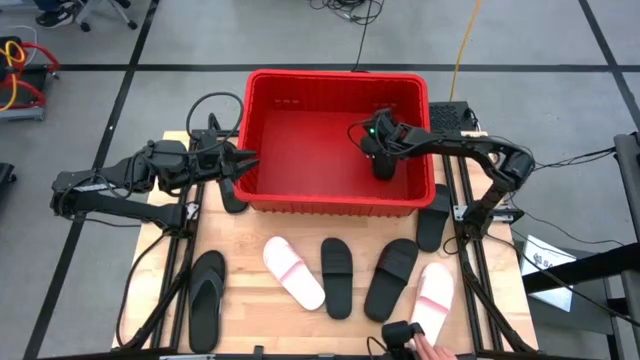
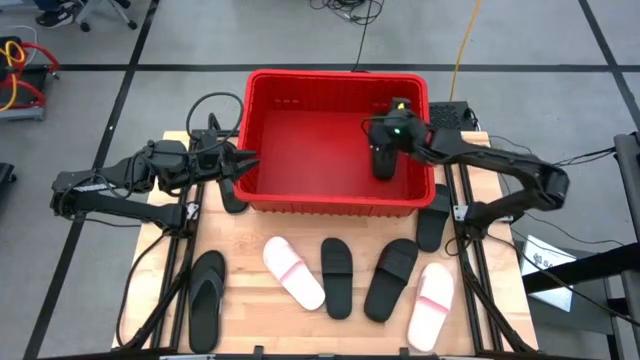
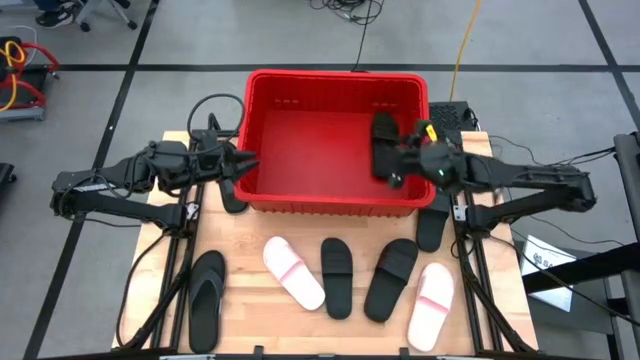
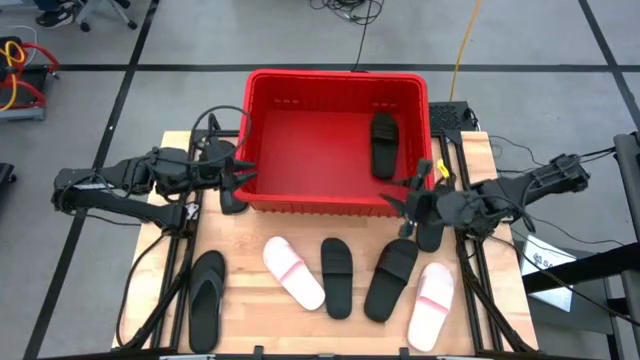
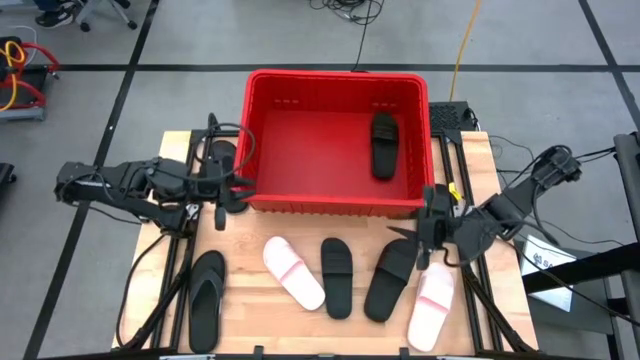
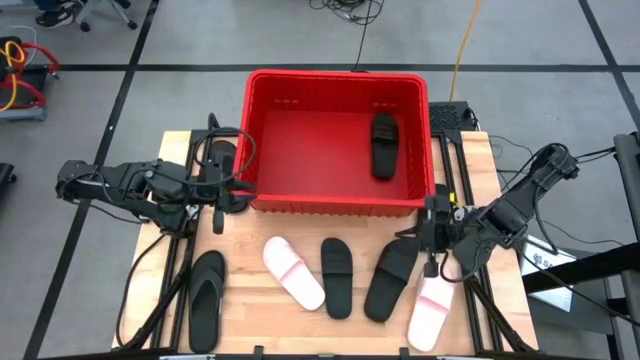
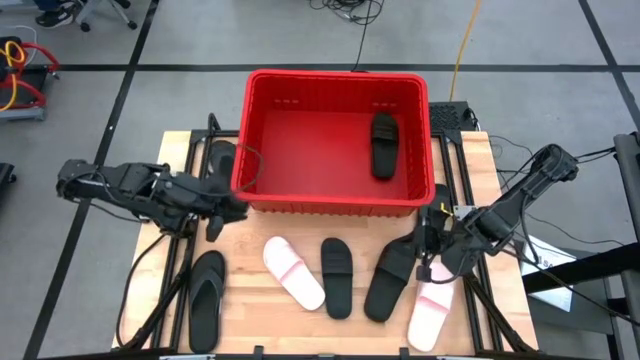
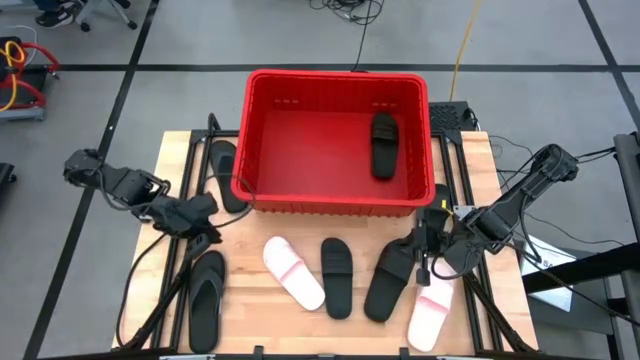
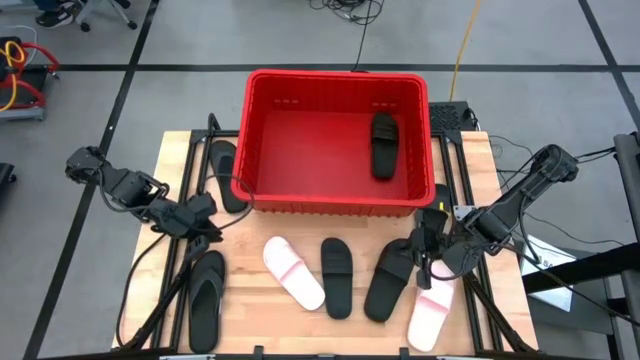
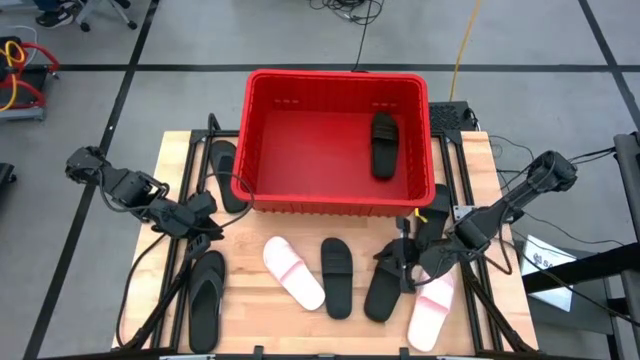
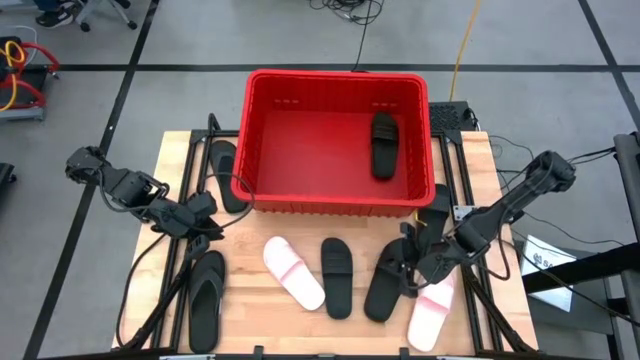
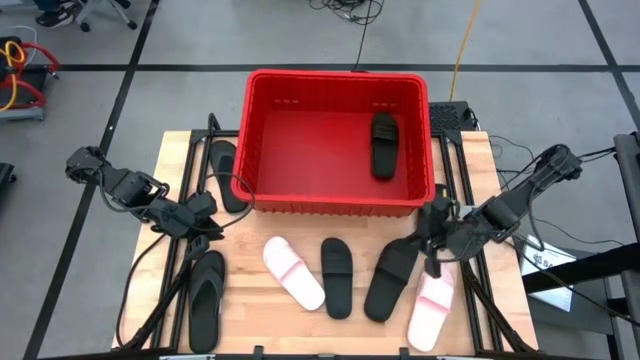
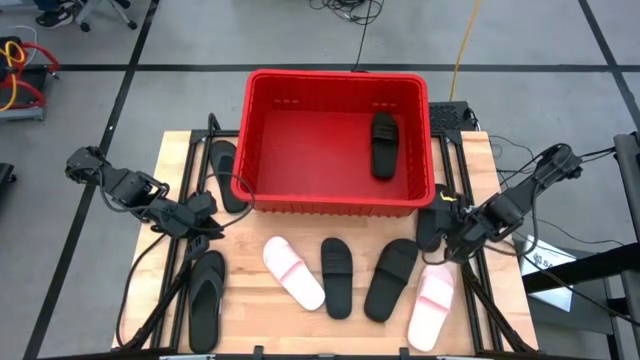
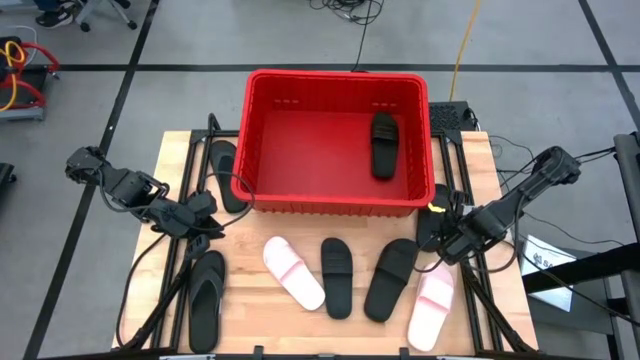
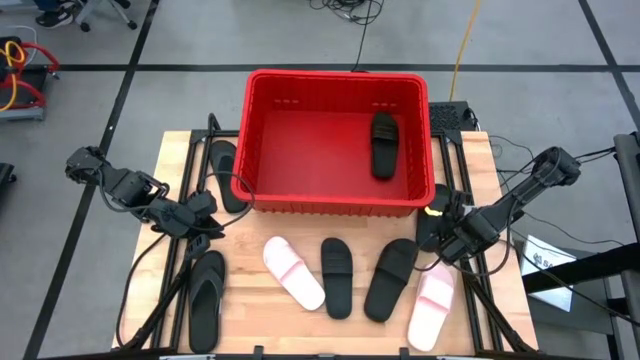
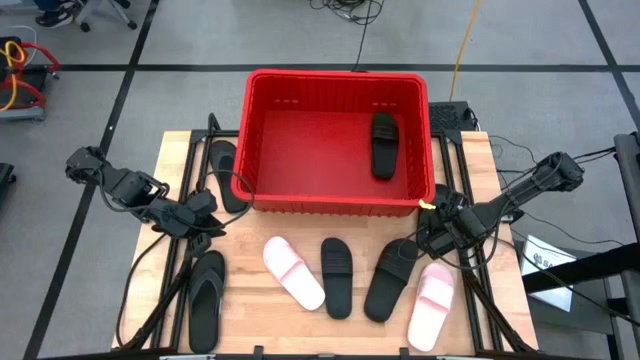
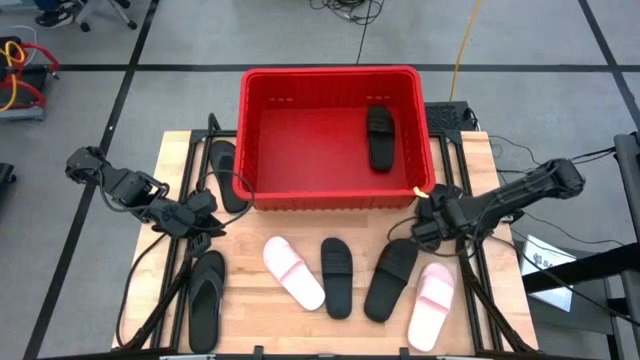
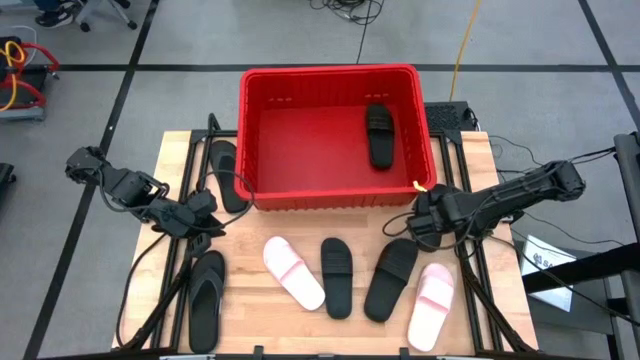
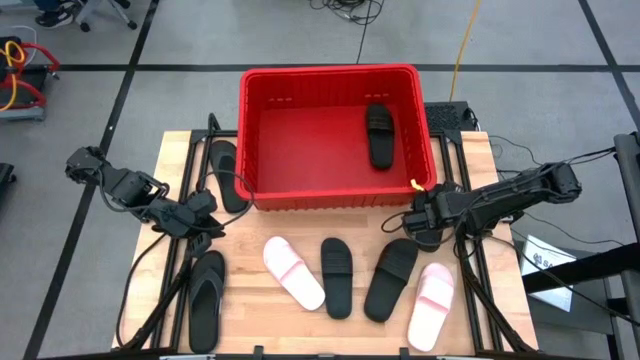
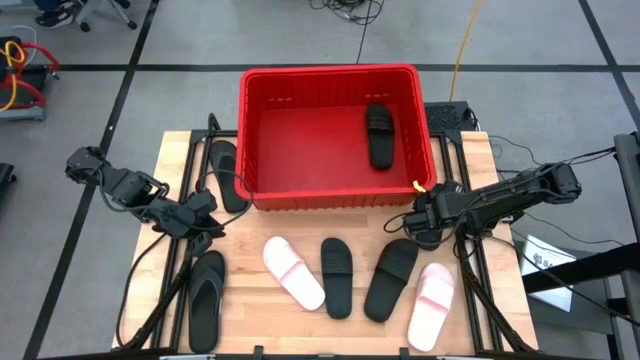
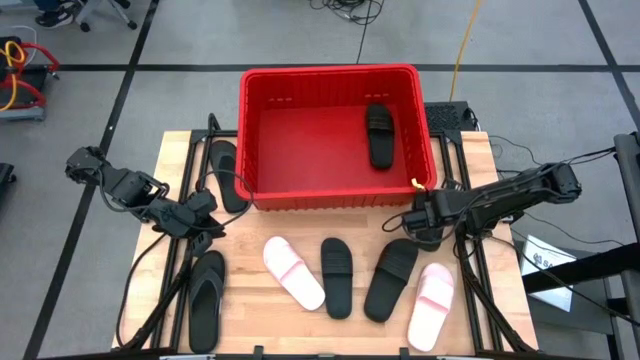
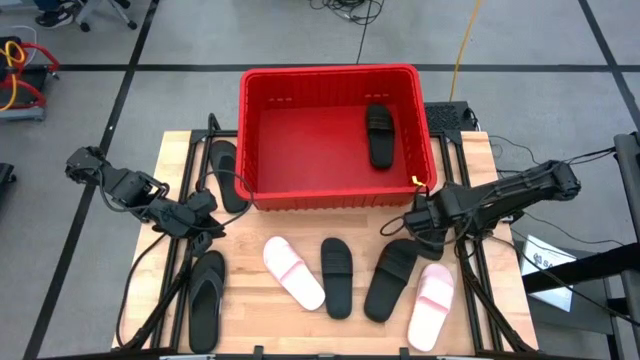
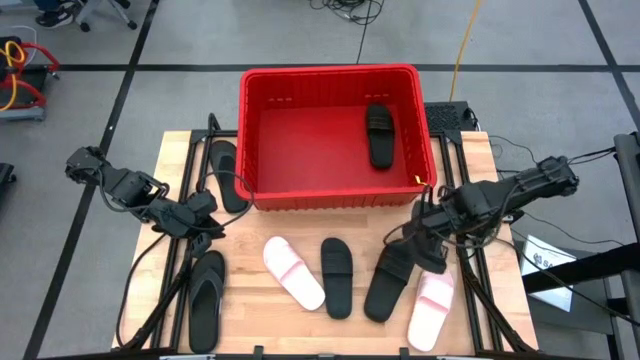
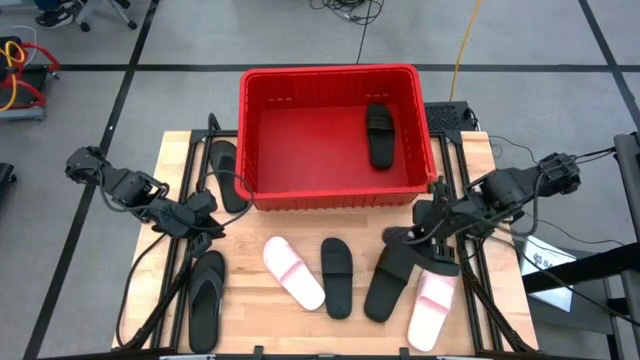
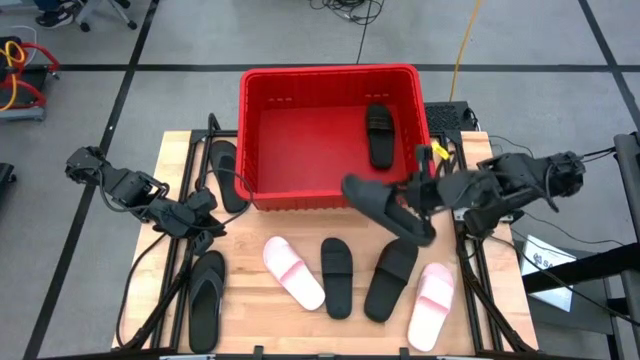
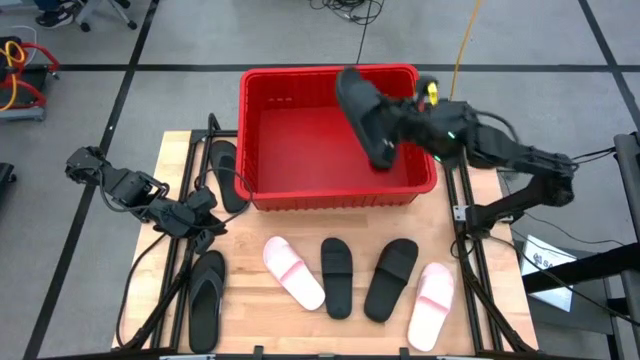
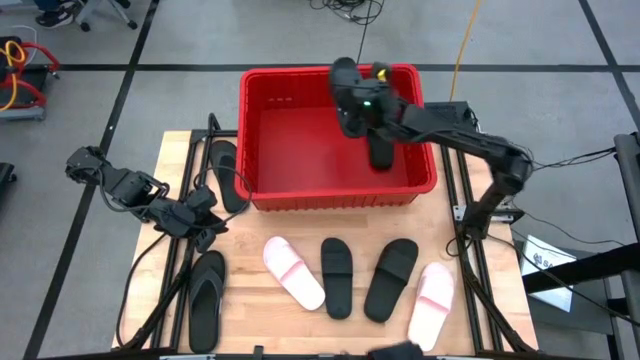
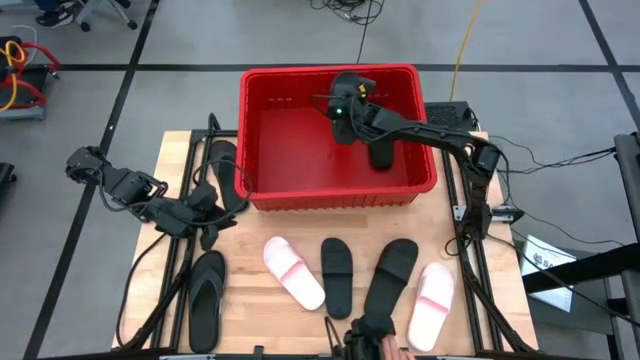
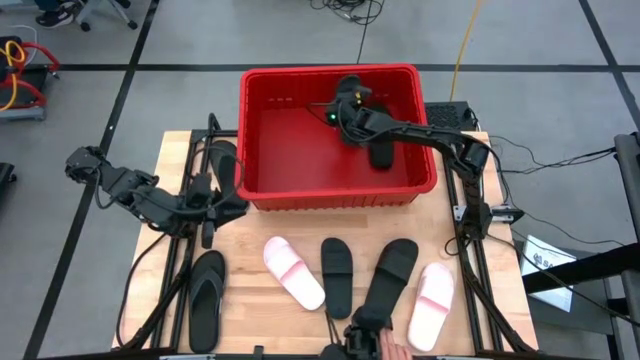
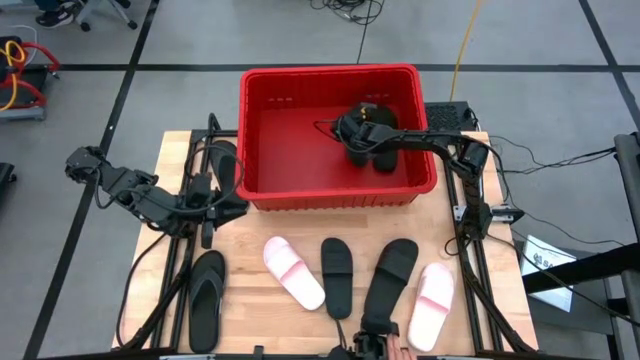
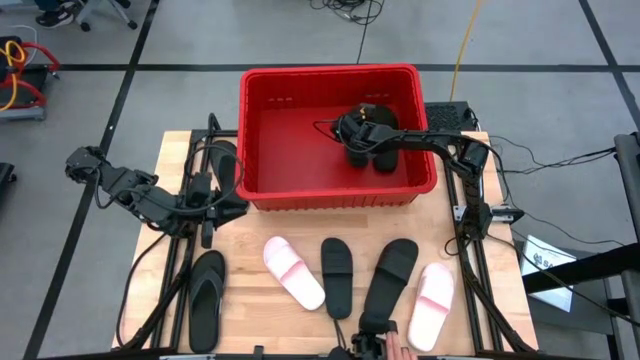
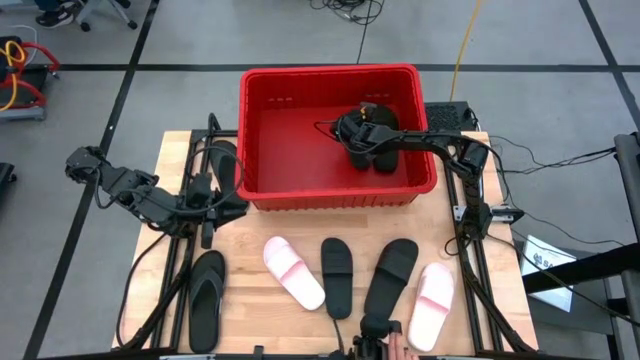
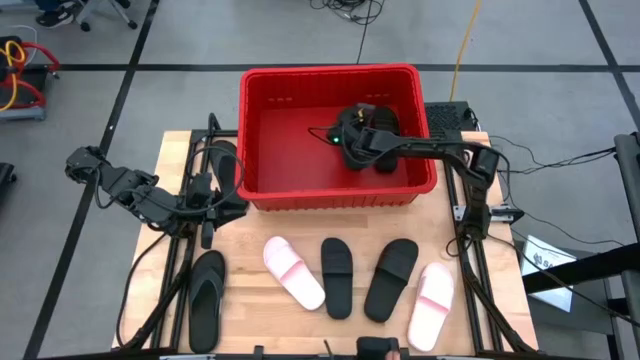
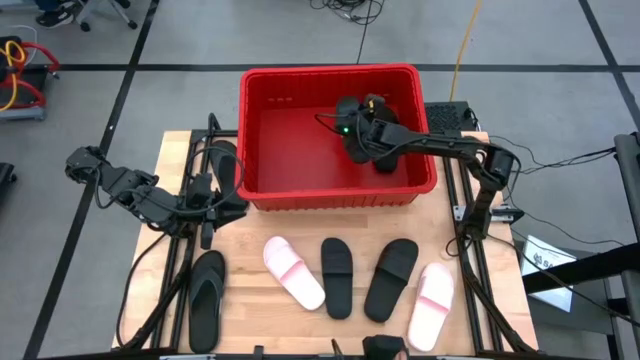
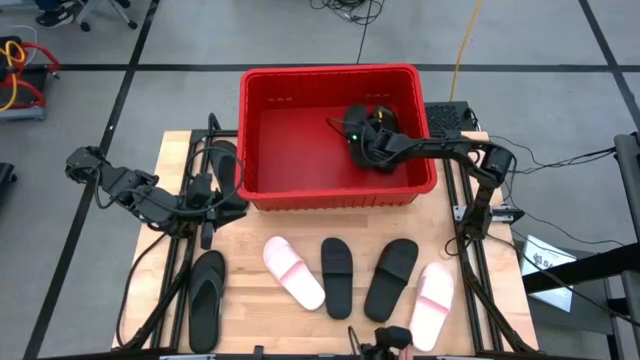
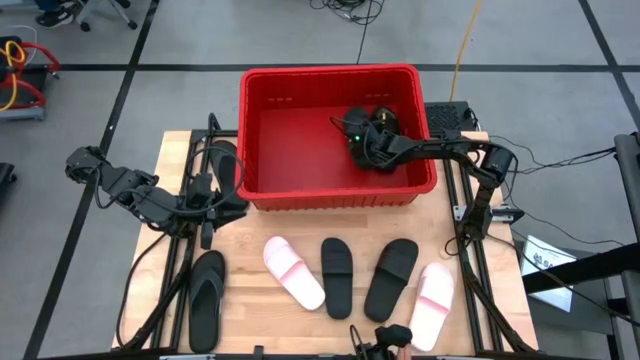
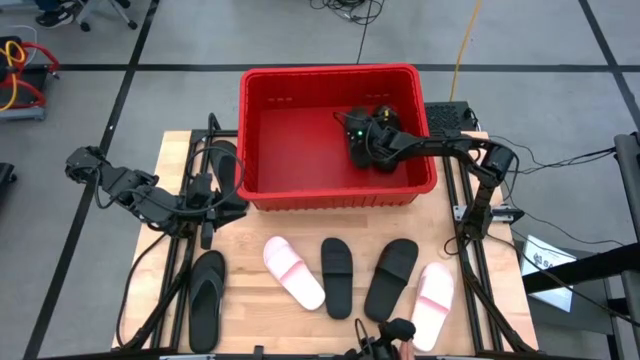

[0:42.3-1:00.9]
Task: Pick and place slides into bin
Put the black slide into the red bin

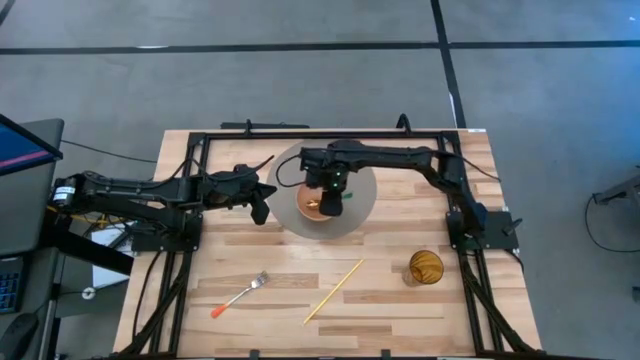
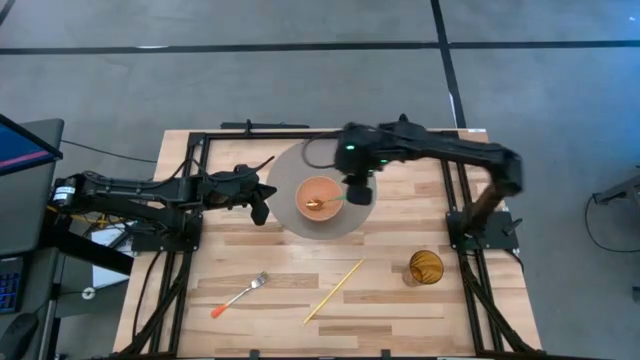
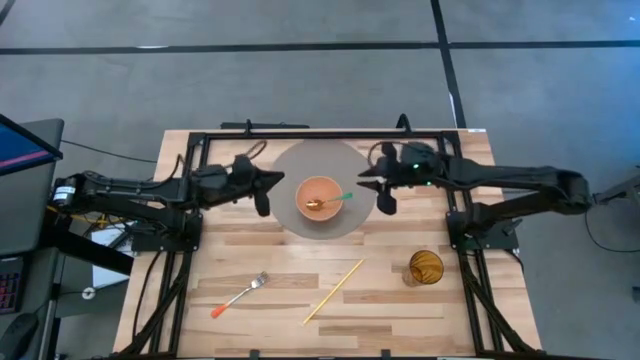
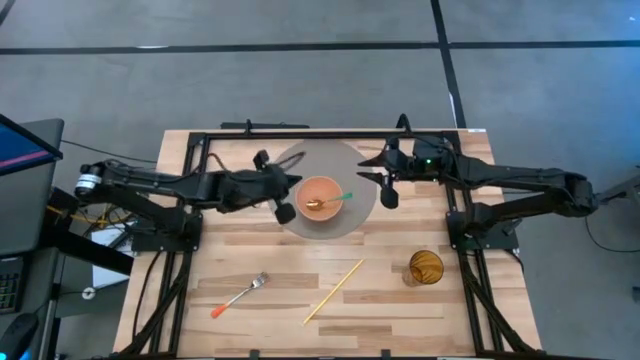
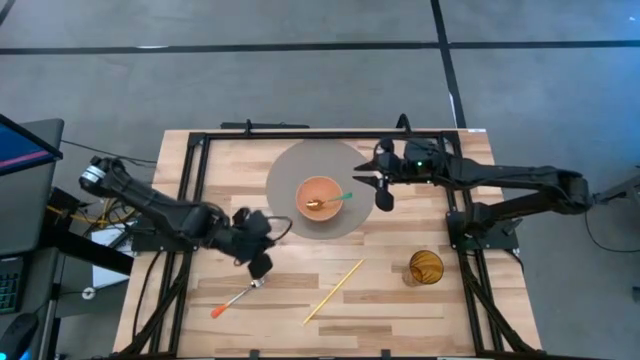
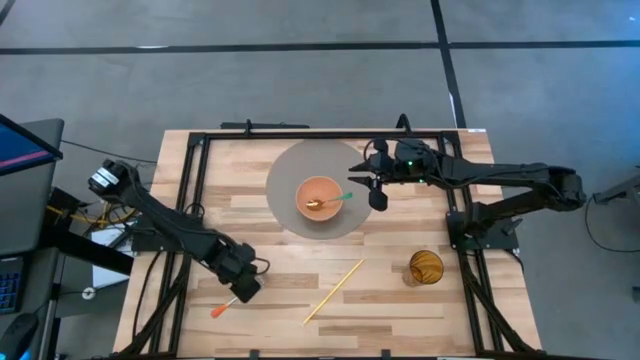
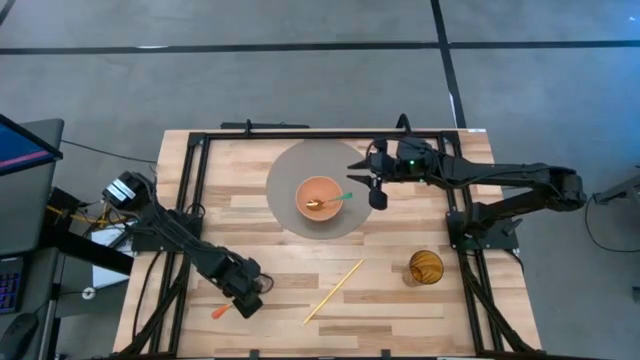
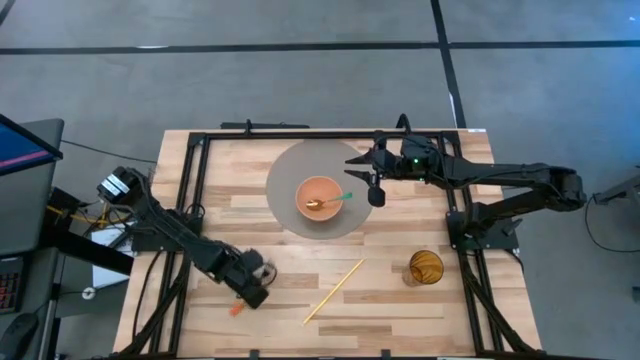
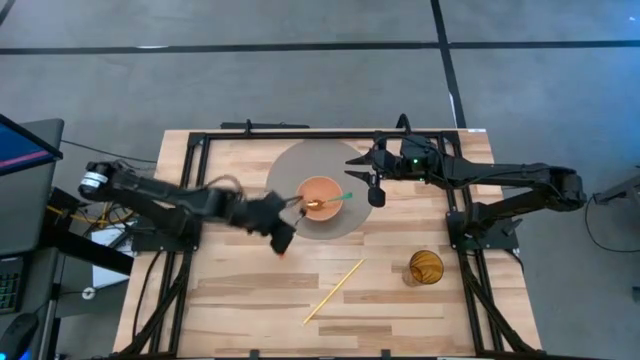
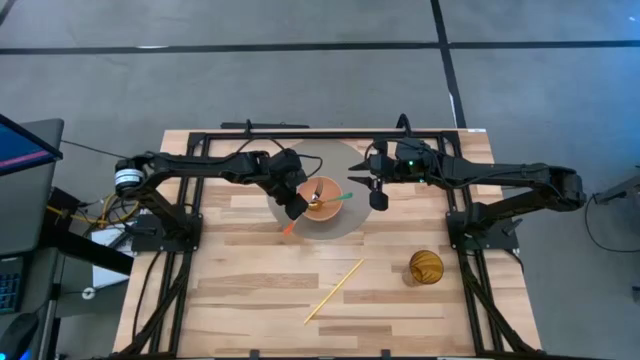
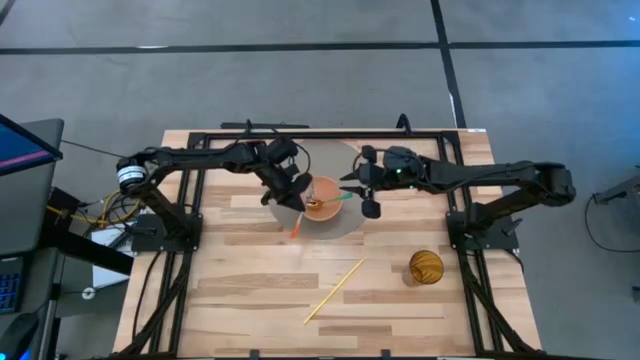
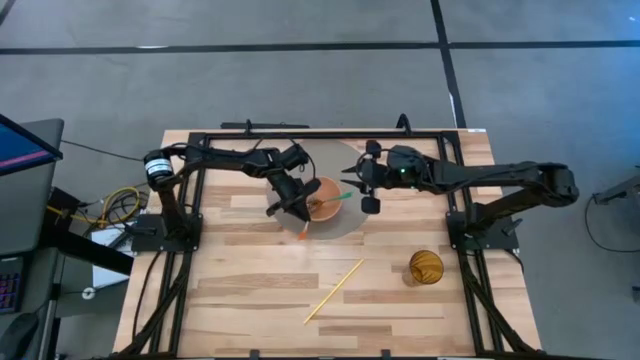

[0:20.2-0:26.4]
Task: Pick & Place Utensil
Put the orange fork into the orange bowl on the gray table placemat
